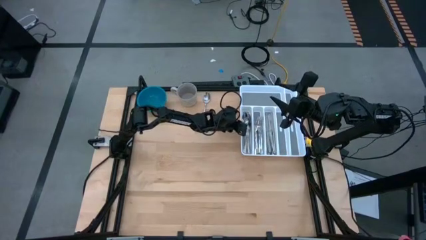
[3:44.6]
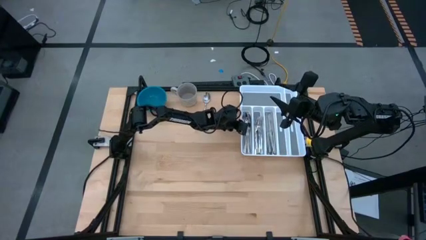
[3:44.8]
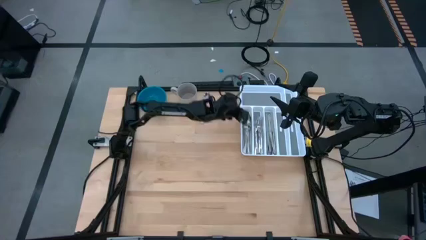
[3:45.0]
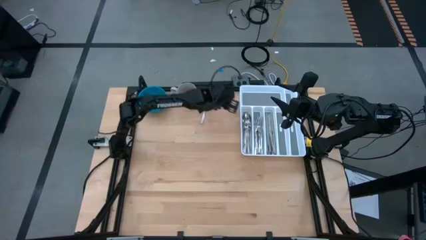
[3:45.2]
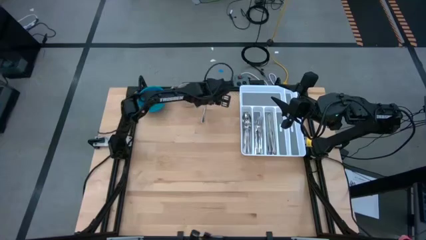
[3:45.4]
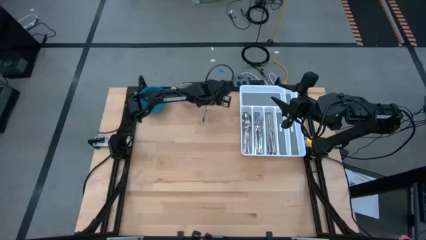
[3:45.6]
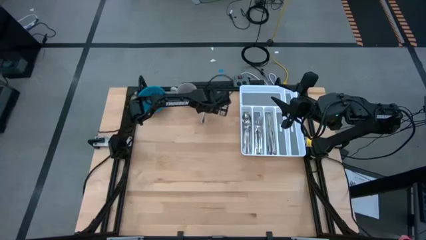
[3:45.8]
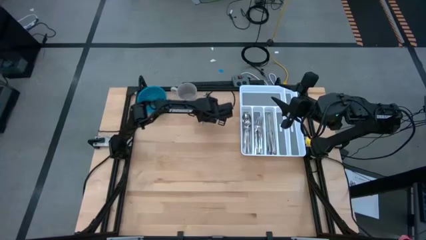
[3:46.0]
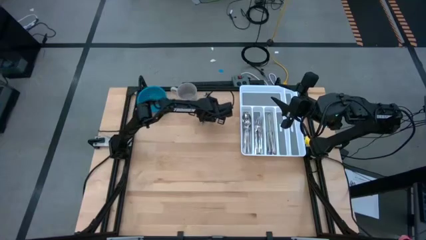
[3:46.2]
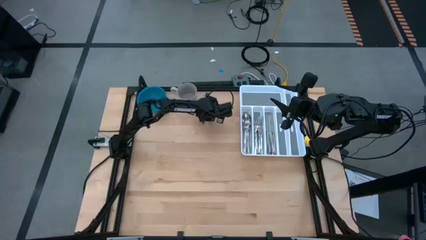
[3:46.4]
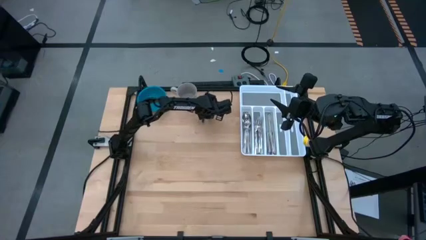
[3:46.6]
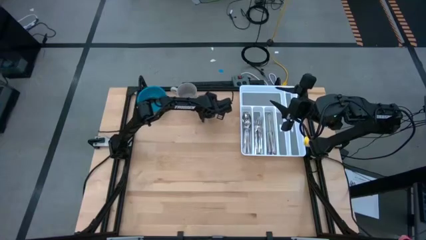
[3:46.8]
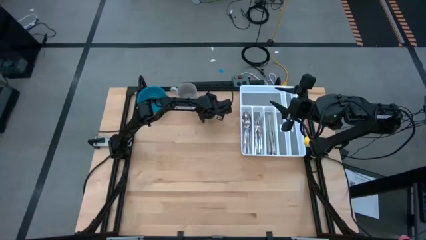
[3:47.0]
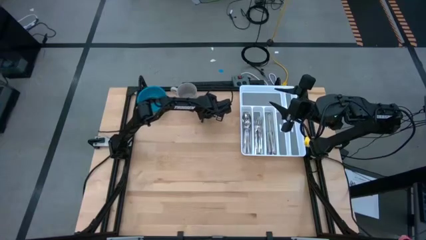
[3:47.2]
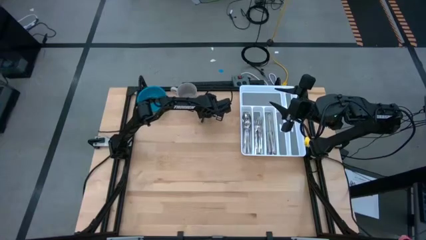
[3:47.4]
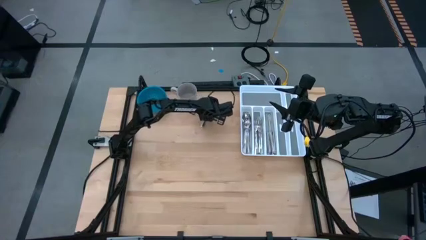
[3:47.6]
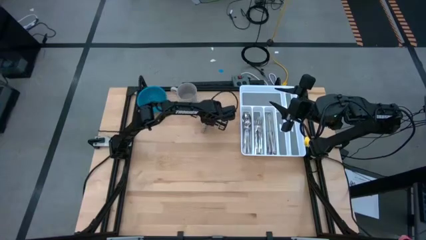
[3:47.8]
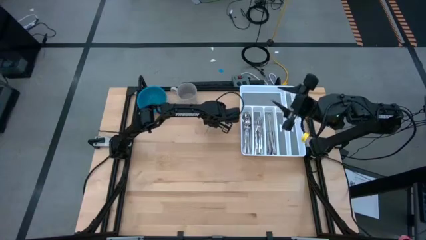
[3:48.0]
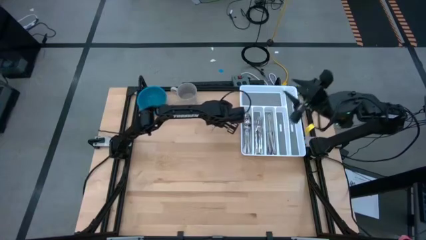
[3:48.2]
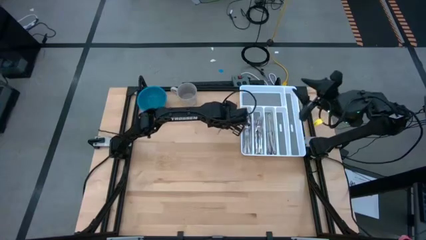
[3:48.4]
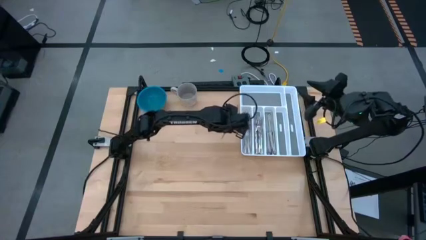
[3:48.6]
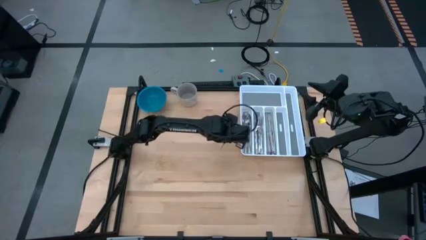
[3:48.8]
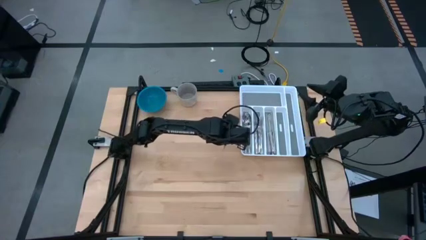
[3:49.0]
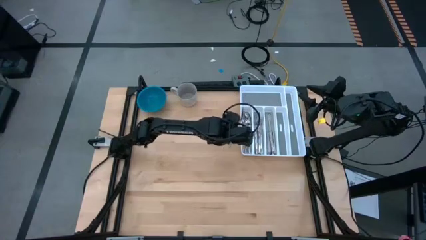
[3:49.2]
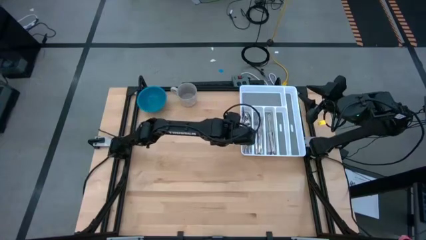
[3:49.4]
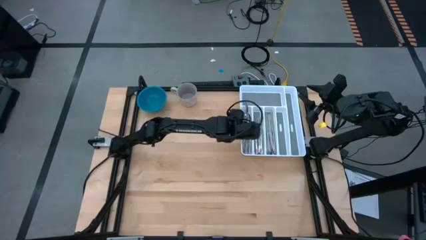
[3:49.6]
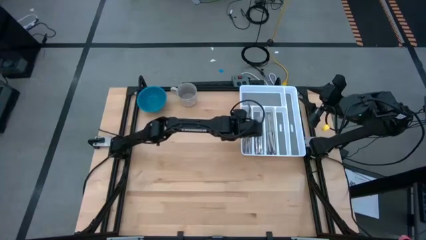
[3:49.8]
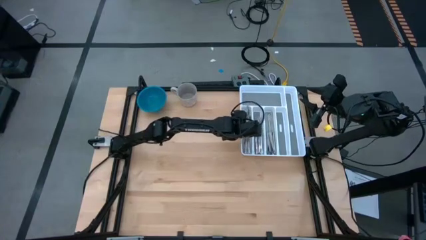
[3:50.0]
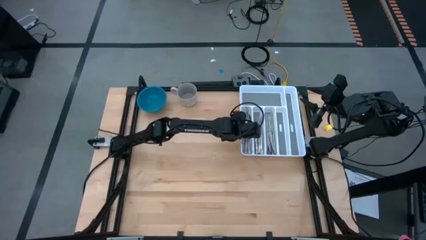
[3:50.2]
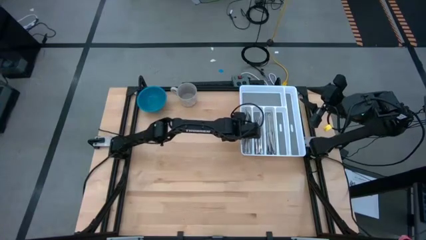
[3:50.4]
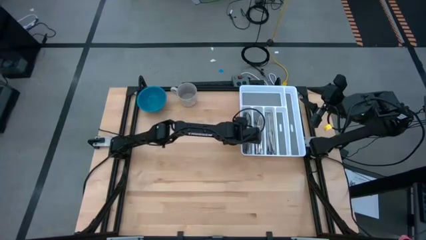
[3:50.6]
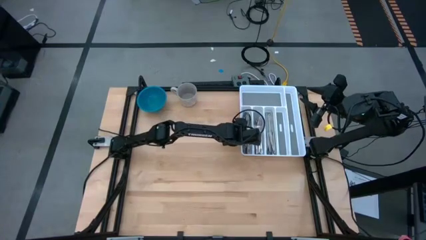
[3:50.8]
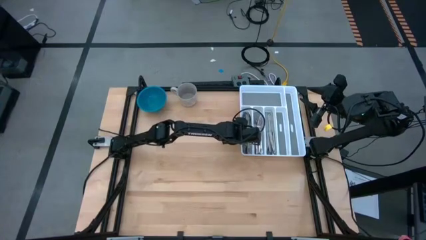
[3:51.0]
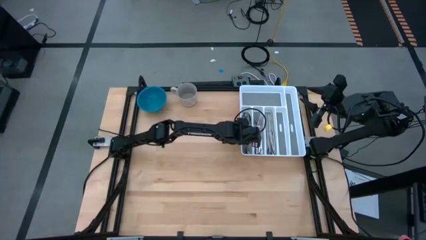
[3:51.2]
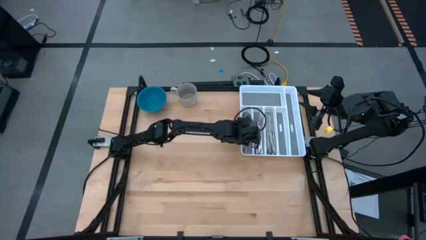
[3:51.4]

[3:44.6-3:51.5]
Task: Sort silverware
Put the spoon in the silverware tray

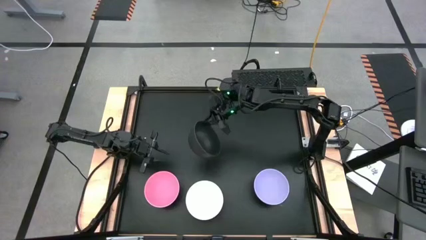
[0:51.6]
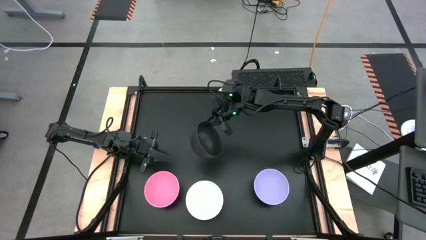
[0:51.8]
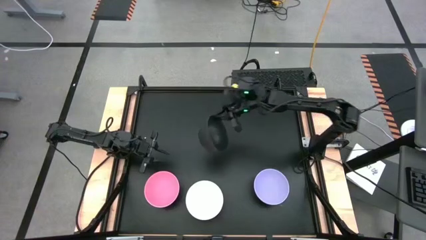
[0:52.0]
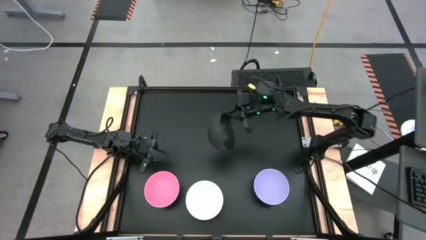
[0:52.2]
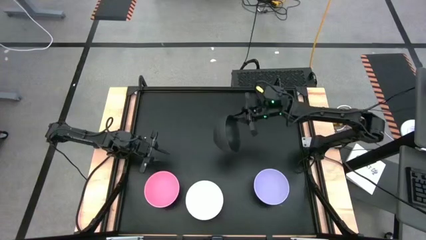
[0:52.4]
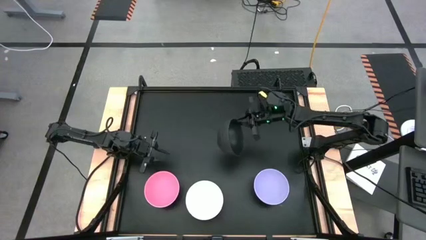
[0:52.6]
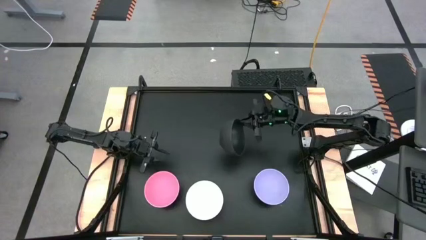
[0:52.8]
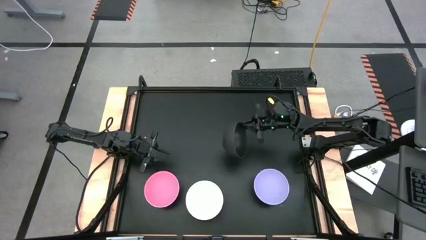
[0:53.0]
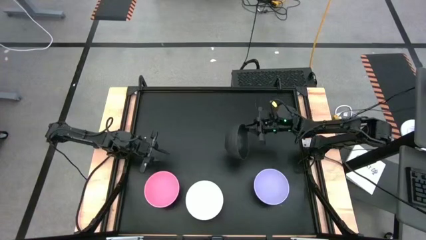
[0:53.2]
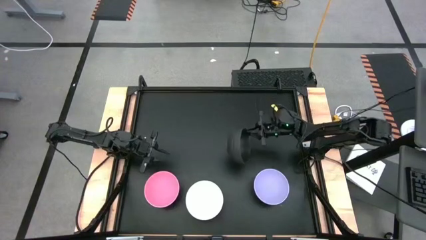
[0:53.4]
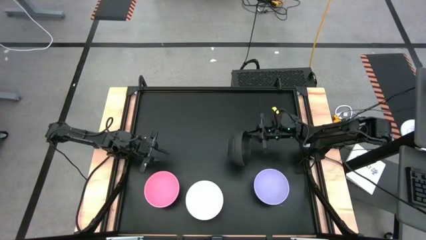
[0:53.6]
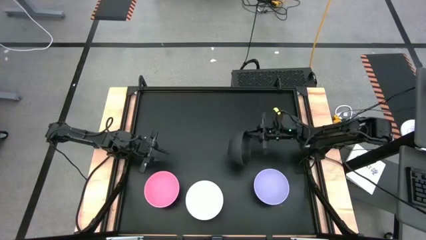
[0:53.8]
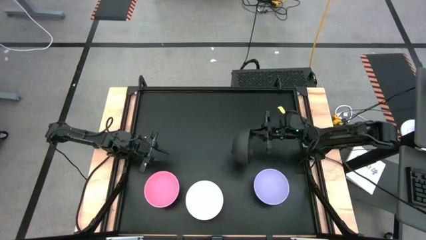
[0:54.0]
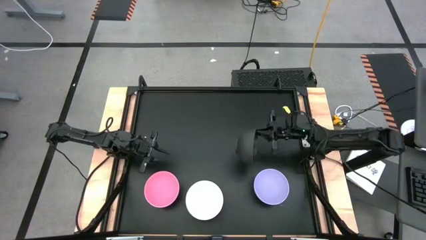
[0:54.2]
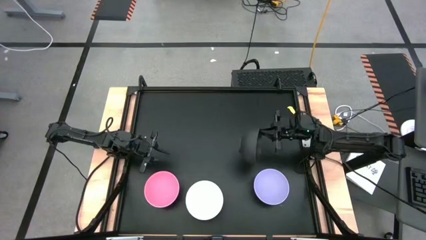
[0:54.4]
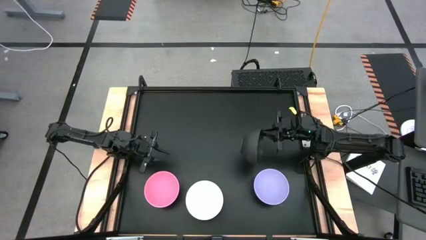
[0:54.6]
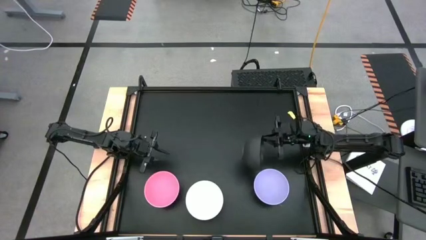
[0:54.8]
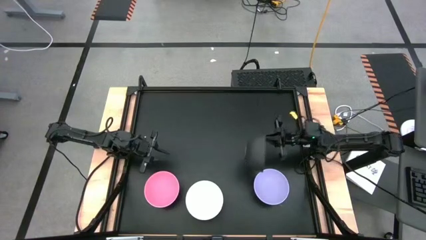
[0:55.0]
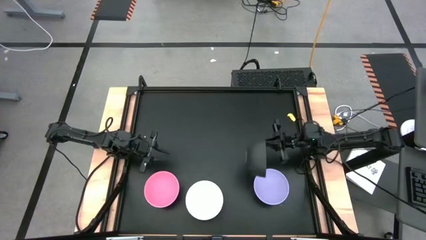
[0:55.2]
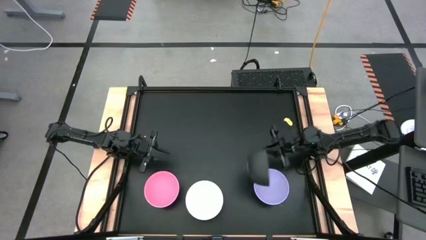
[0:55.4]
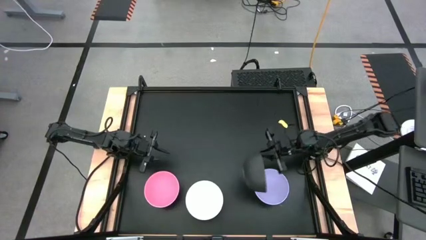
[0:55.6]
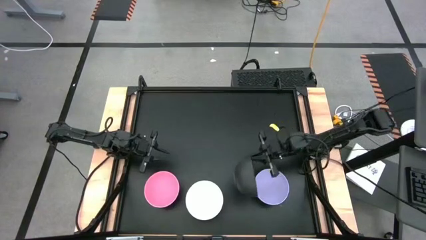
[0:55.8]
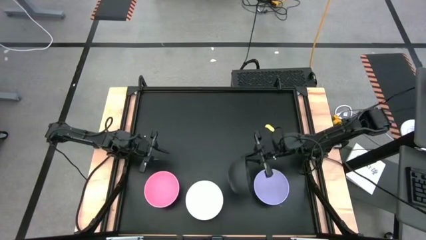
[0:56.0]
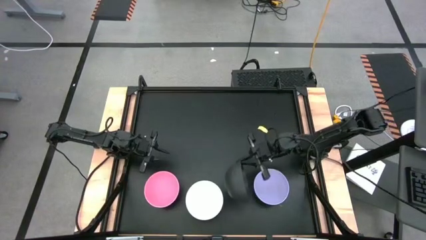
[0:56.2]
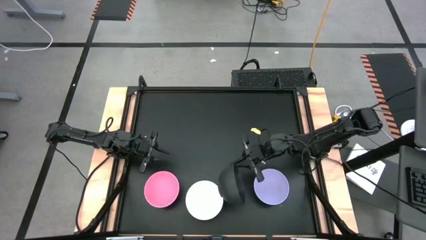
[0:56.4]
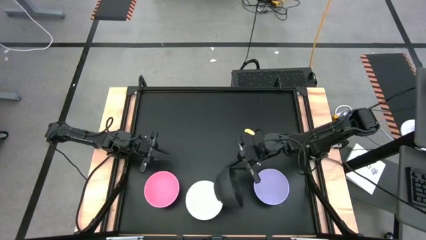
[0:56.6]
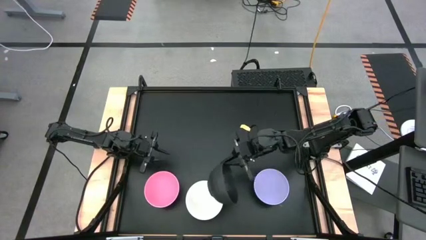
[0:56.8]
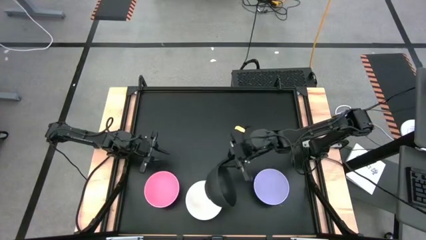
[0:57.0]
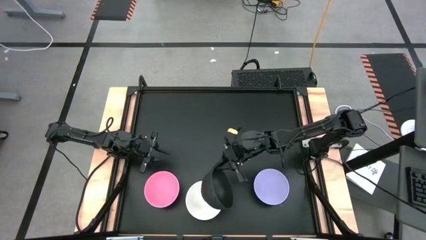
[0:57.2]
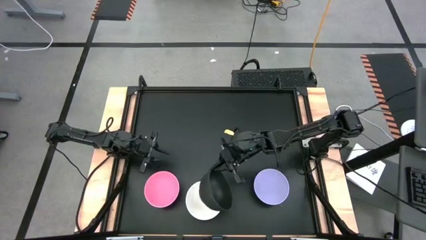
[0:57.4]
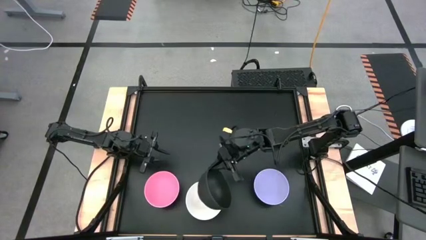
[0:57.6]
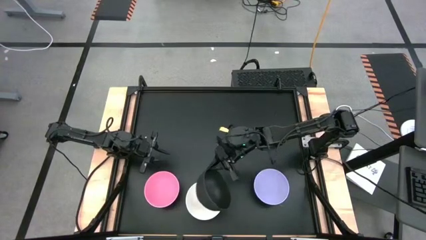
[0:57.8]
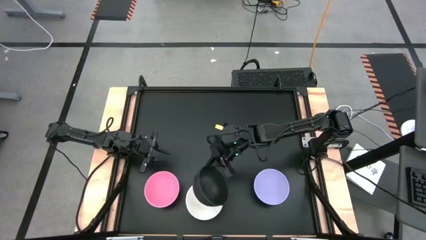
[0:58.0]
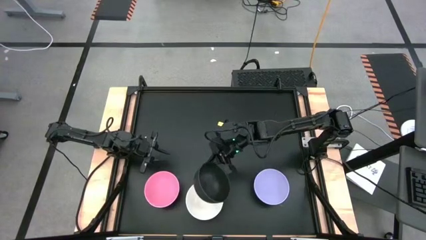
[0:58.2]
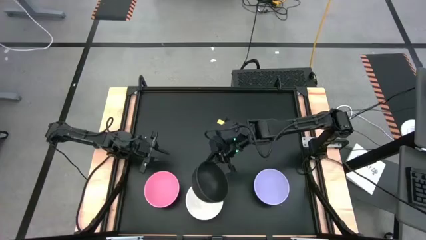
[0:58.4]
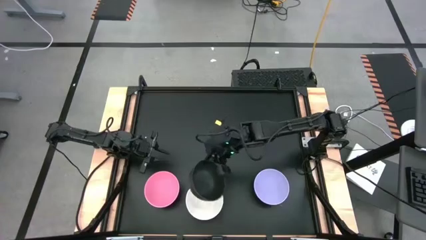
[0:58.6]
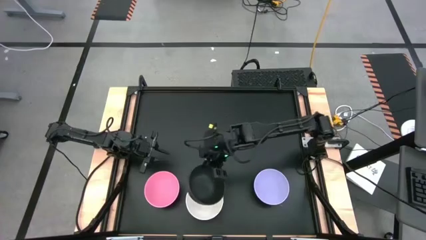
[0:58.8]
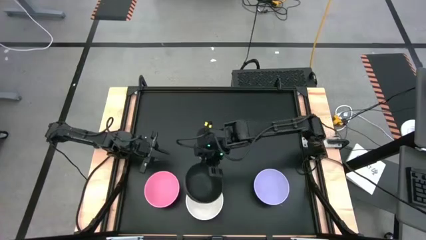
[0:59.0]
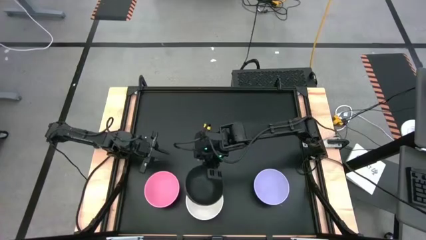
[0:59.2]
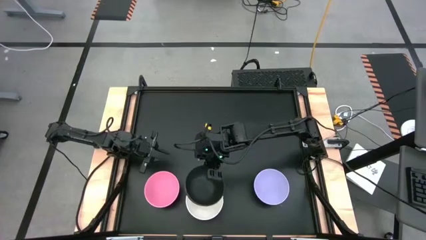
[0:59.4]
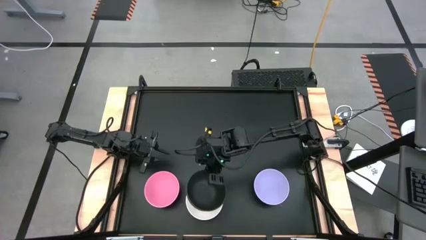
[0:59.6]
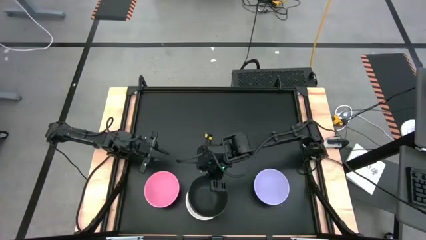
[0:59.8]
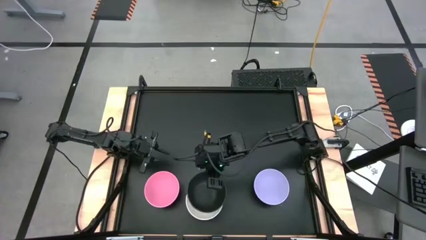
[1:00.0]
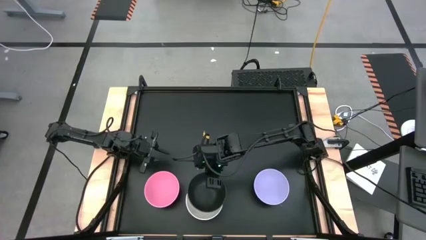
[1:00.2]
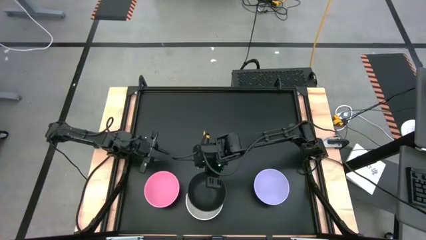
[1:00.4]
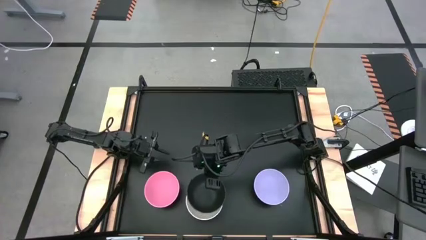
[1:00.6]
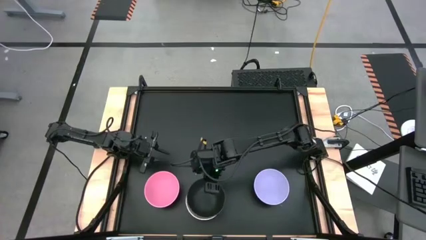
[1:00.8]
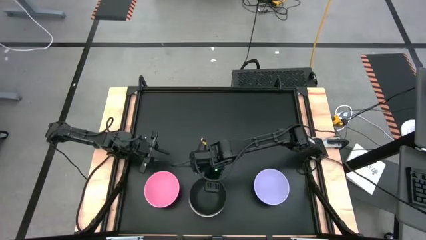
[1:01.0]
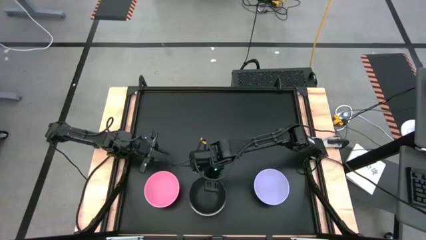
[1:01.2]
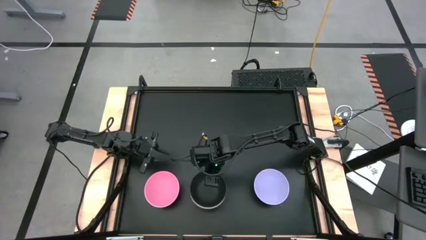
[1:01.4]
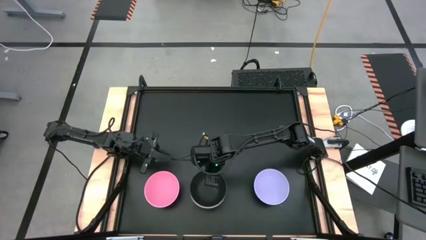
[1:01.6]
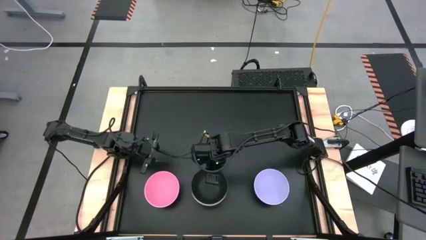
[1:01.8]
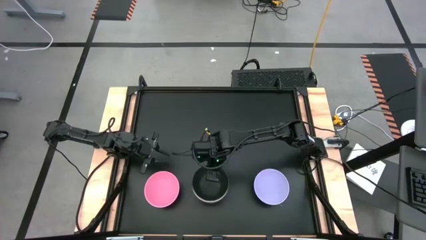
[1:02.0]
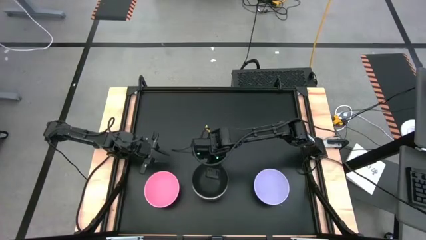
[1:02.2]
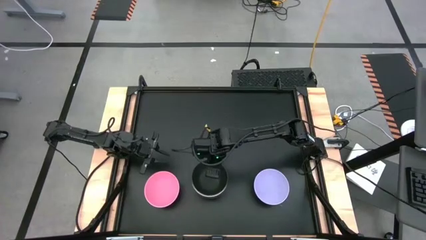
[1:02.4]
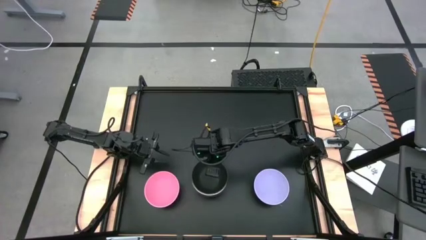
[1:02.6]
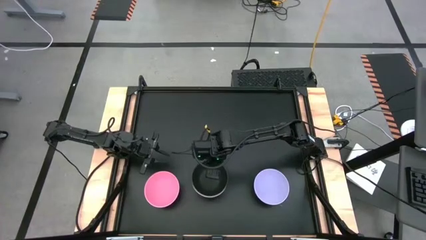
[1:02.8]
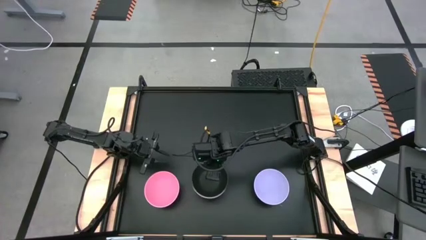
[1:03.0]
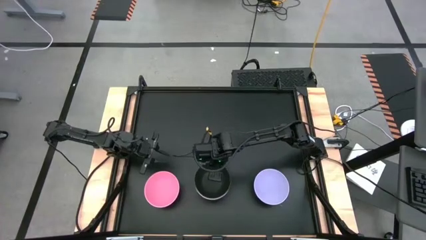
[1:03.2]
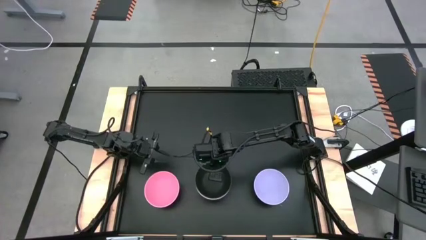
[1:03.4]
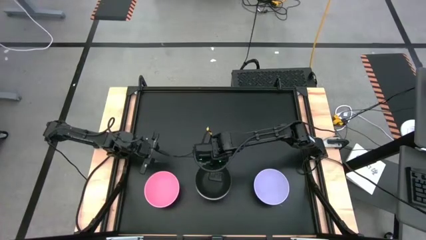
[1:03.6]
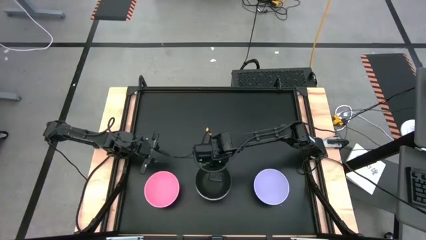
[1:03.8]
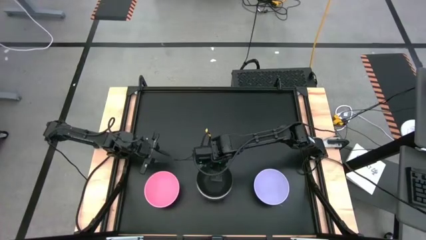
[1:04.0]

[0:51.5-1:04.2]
Task: Nest bowls inside each other
Stack the black bowl on top of the stacked white bowl
